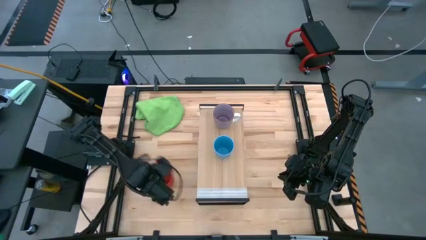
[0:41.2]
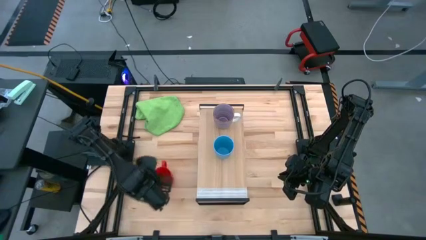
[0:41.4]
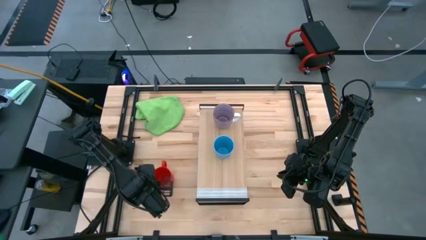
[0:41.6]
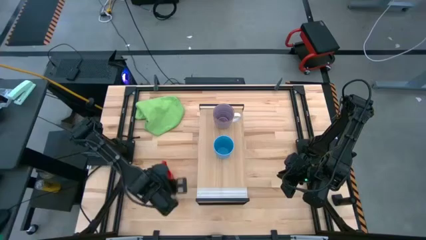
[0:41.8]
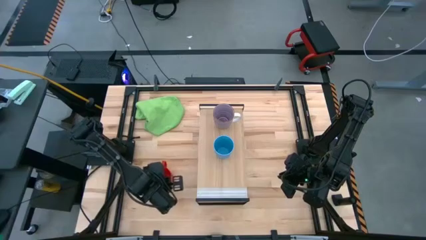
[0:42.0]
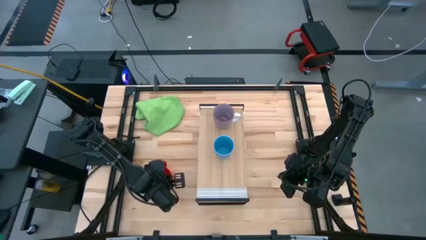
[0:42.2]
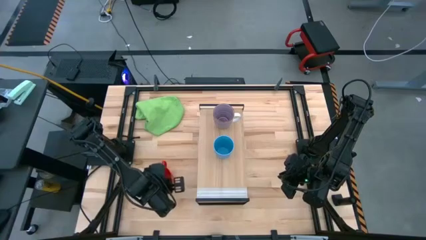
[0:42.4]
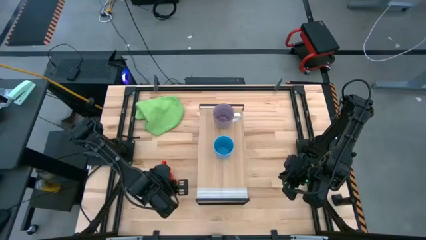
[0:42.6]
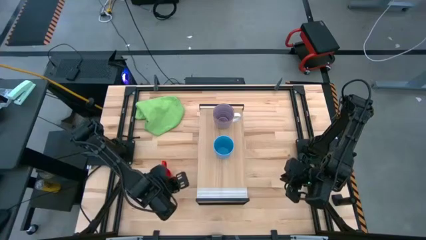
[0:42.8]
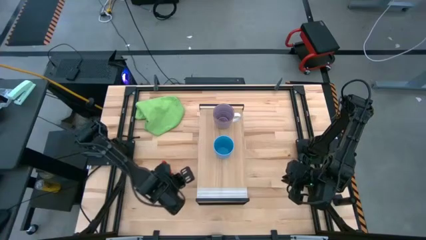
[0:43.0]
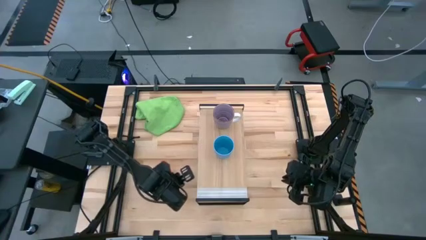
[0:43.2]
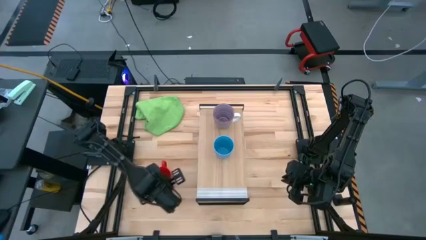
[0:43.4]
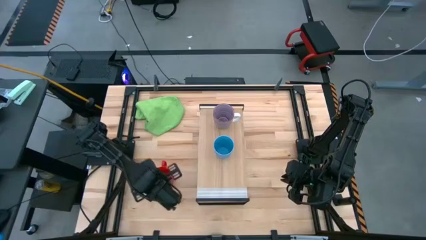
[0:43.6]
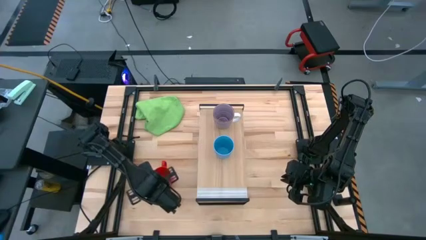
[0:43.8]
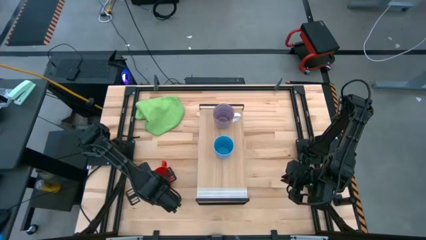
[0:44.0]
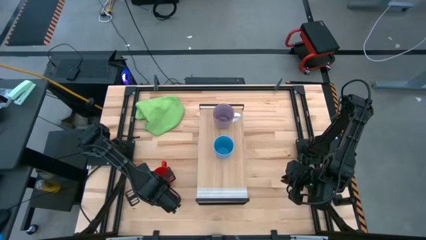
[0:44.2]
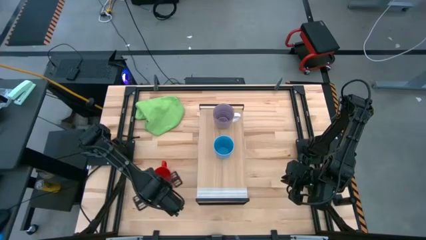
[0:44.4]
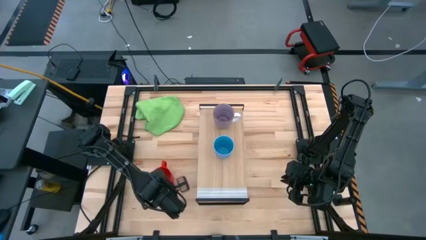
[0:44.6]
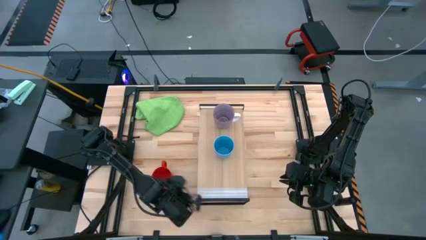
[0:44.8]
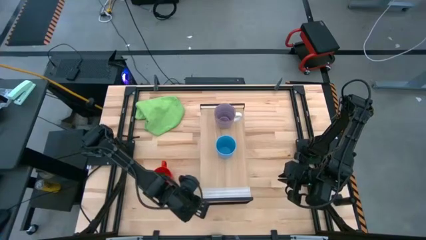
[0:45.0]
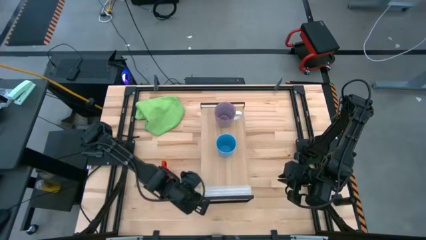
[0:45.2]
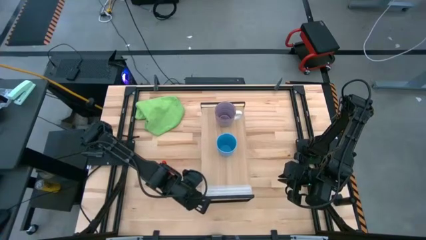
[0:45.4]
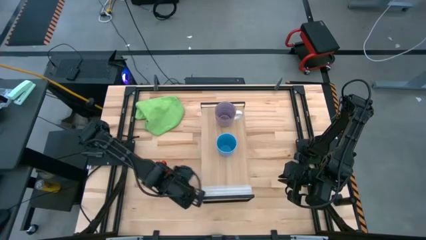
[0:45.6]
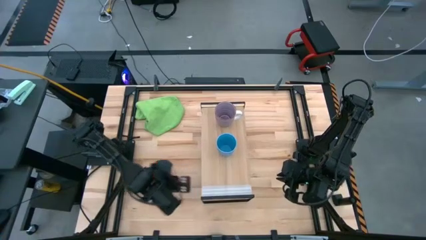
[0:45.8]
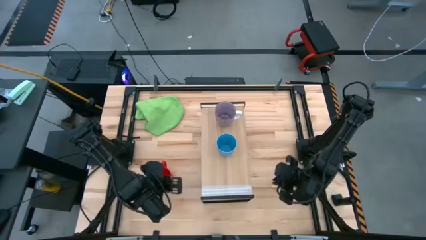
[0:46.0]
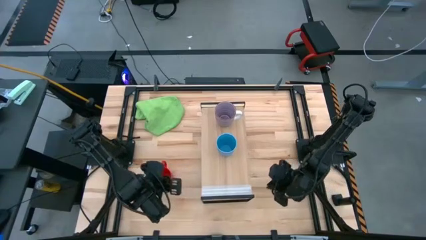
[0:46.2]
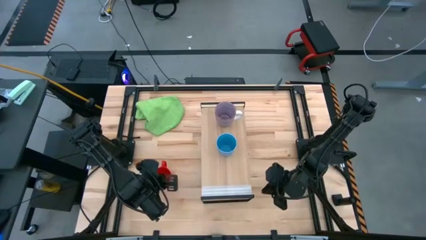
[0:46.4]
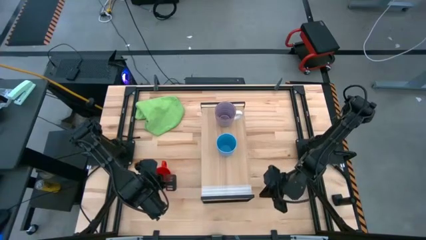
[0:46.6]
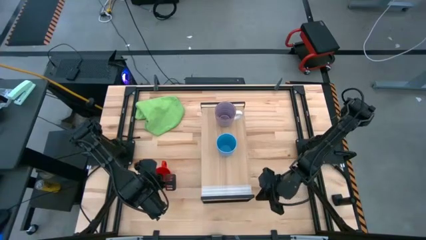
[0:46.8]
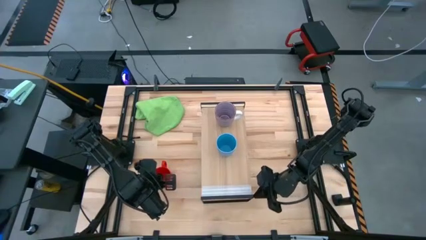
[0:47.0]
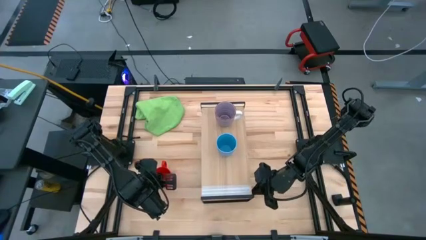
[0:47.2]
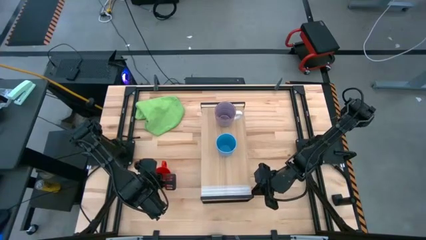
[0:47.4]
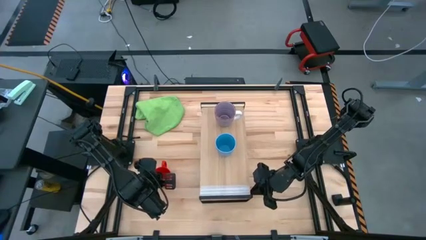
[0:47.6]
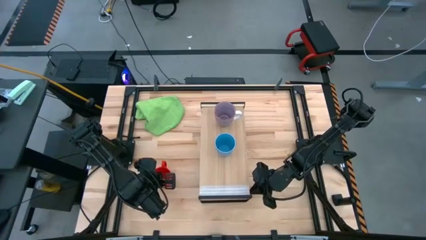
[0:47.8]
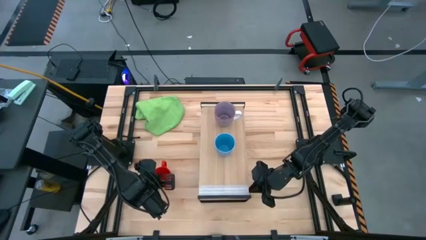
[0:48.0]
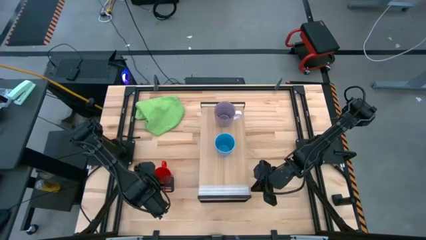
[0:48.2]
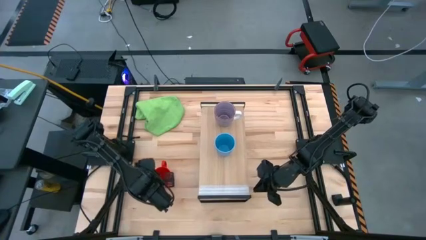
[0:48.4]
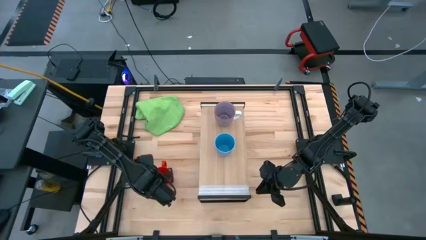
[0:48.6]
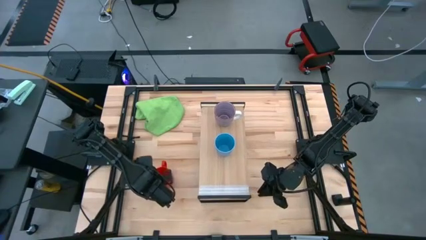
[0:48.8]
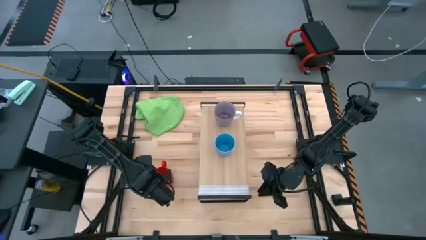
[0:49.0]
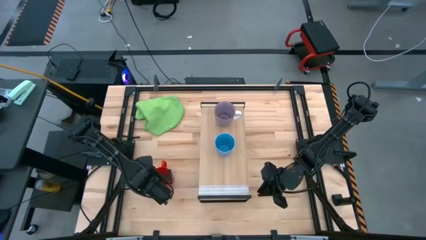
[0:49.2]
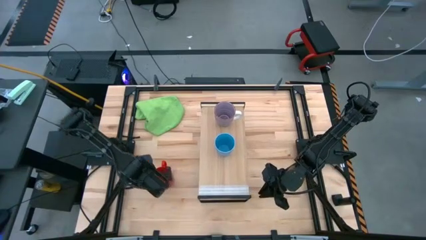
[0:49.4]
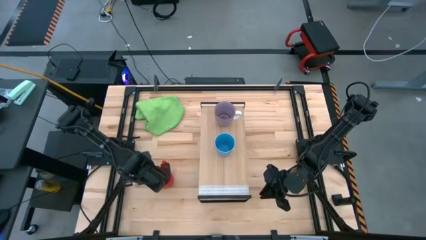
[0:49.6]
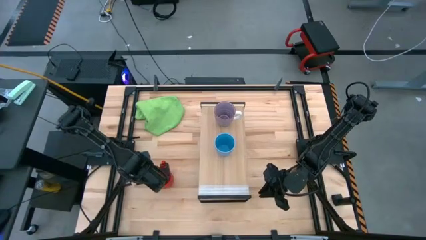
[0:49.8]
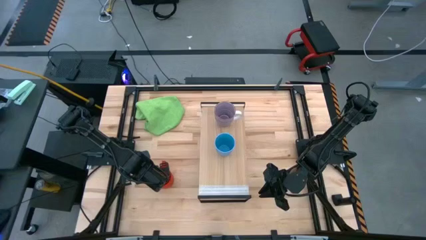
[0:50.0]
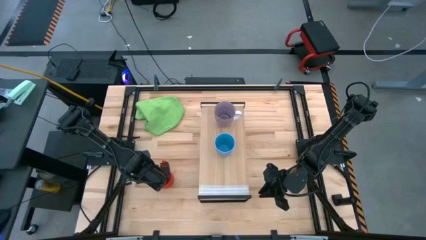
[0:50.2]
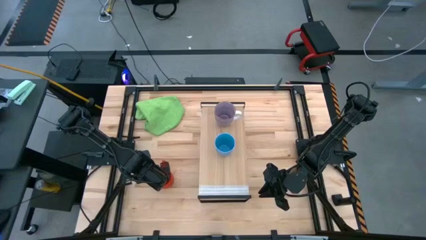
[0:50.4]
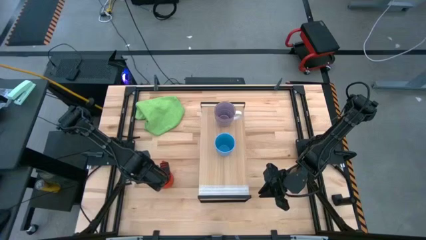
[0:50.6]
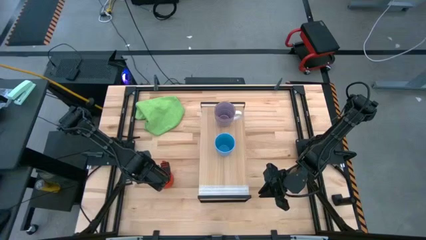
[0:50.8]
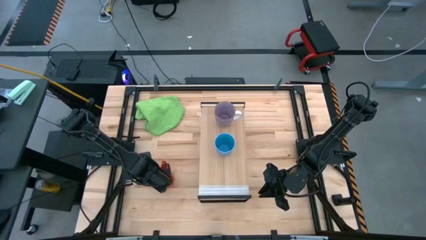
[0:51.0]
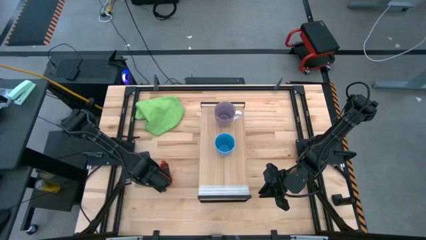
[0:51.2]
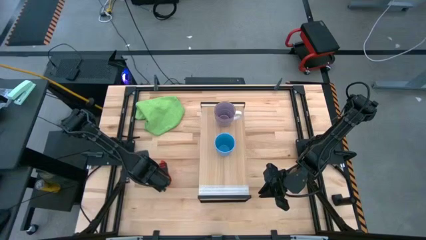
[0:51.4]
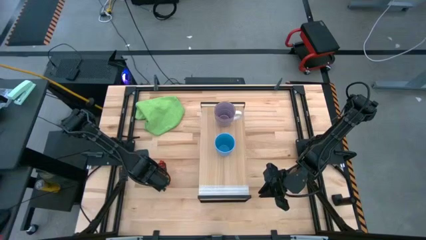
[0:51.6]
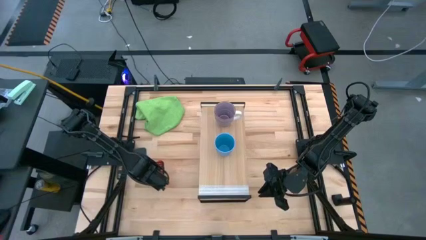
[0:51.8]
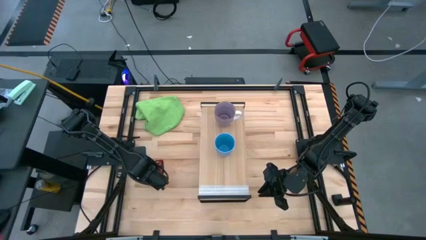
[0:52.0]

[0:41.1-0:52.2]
Task: Stack small to large cups/mugs on shelf
Put the orange mug on the shelf
